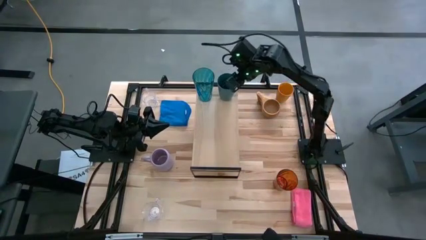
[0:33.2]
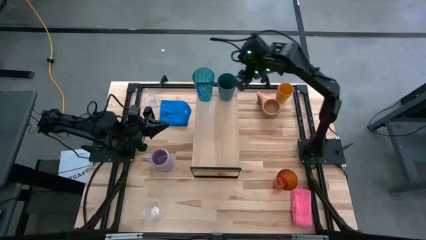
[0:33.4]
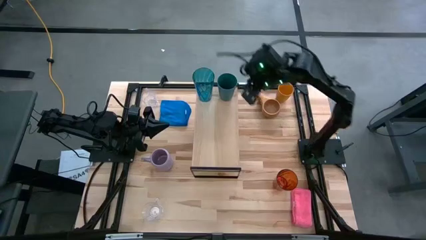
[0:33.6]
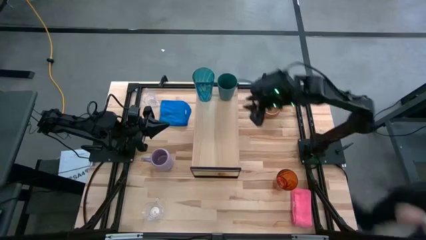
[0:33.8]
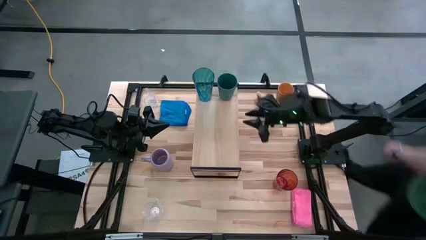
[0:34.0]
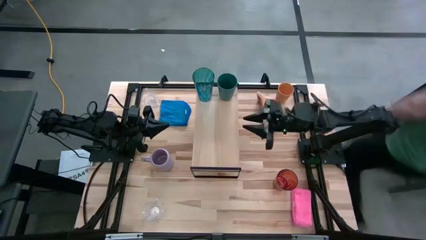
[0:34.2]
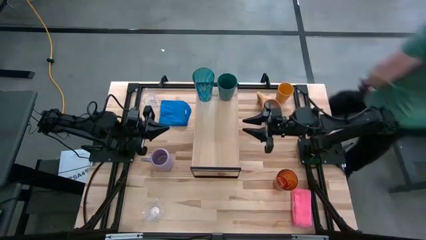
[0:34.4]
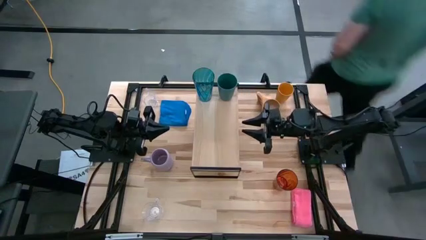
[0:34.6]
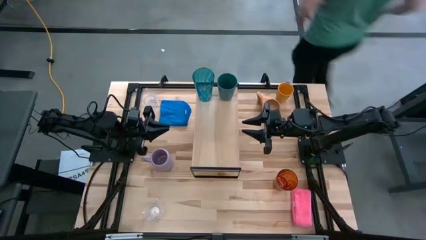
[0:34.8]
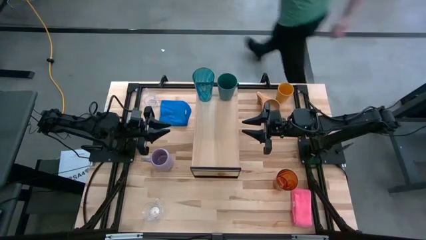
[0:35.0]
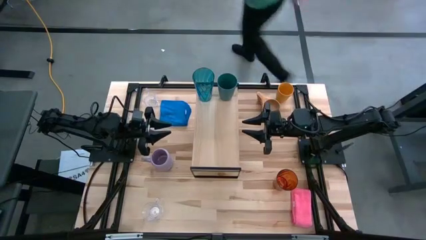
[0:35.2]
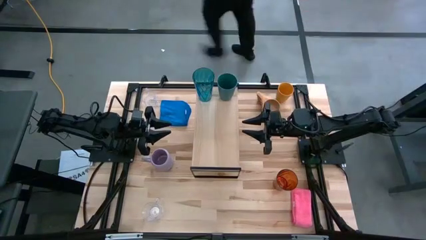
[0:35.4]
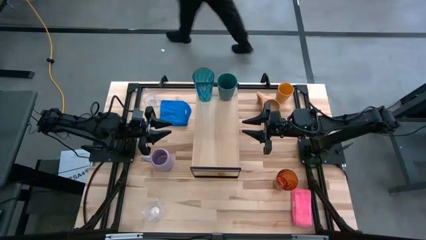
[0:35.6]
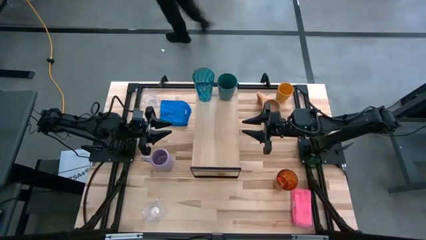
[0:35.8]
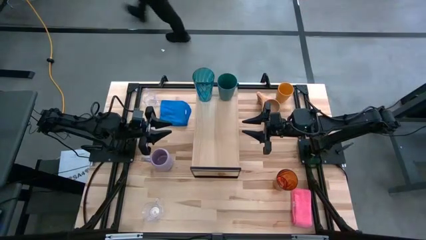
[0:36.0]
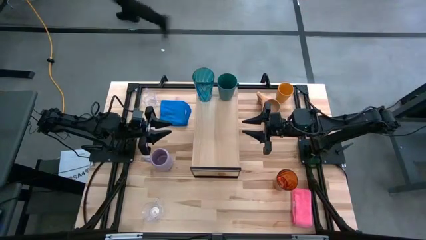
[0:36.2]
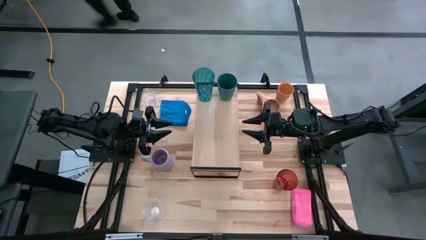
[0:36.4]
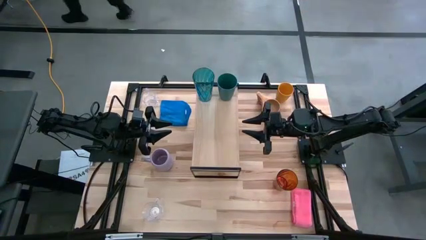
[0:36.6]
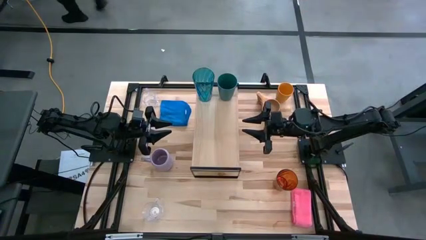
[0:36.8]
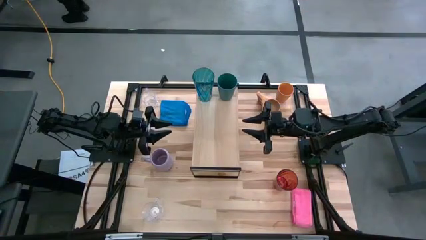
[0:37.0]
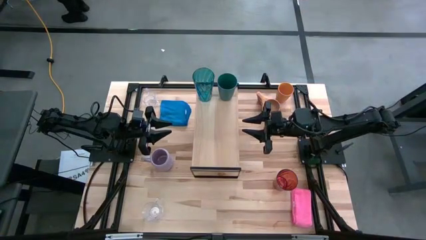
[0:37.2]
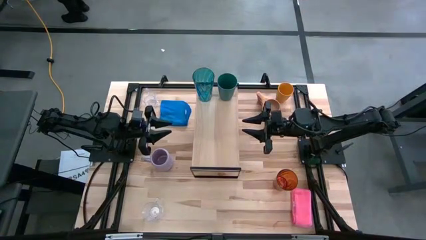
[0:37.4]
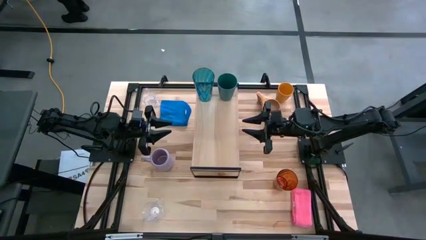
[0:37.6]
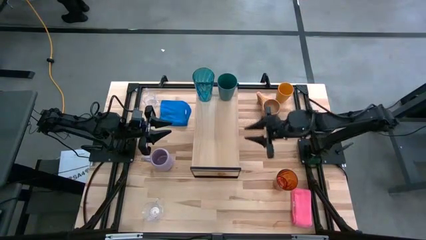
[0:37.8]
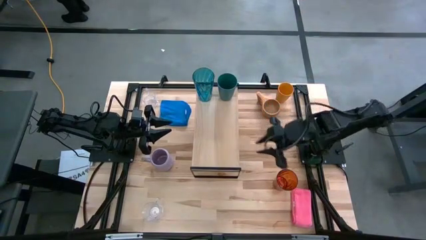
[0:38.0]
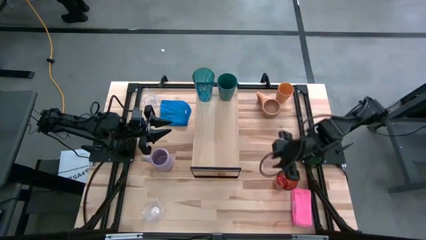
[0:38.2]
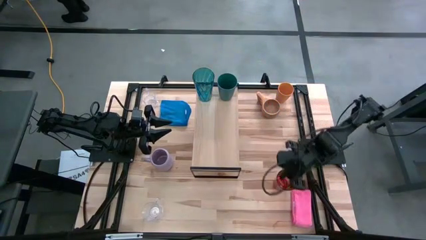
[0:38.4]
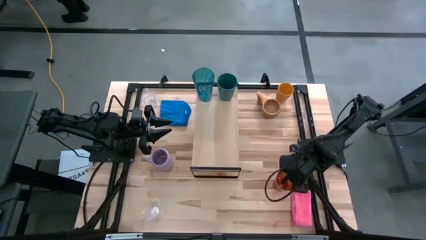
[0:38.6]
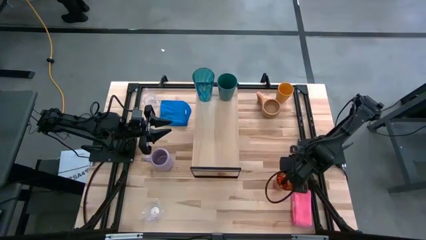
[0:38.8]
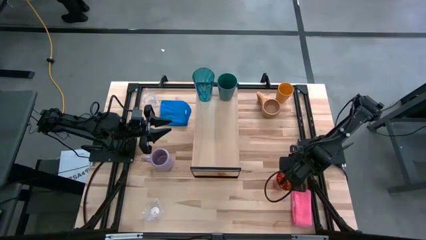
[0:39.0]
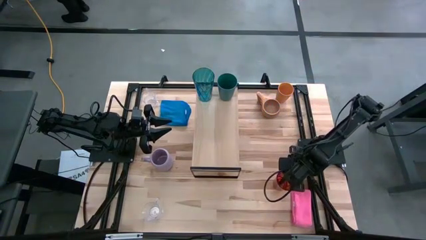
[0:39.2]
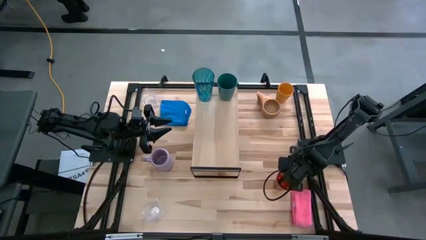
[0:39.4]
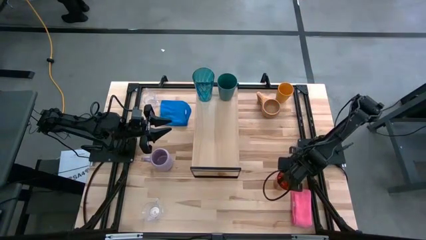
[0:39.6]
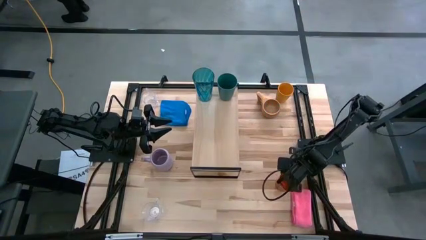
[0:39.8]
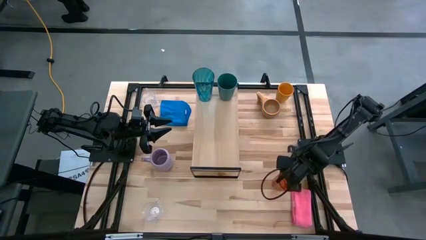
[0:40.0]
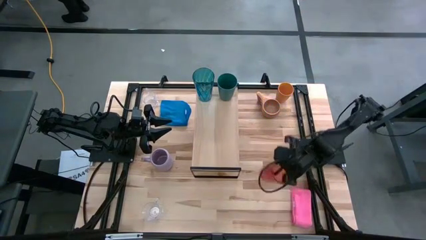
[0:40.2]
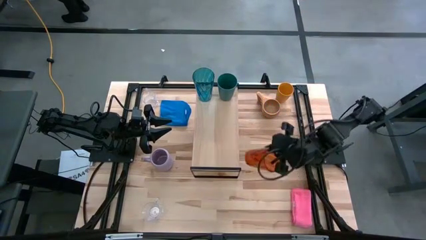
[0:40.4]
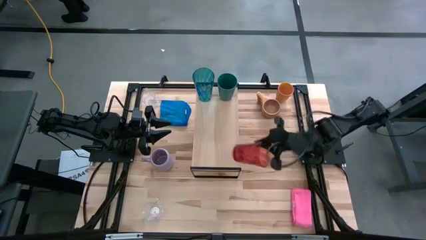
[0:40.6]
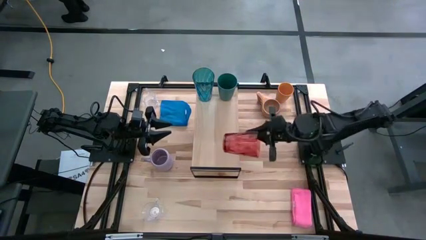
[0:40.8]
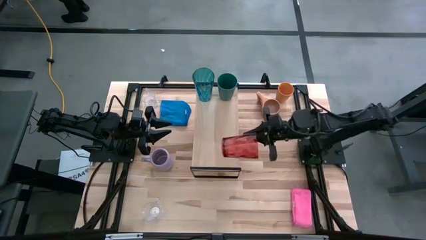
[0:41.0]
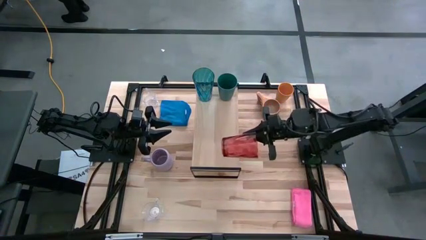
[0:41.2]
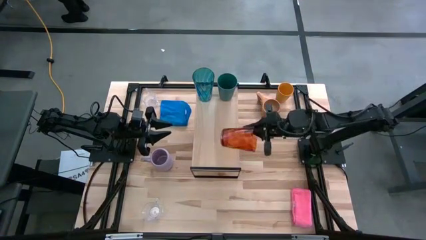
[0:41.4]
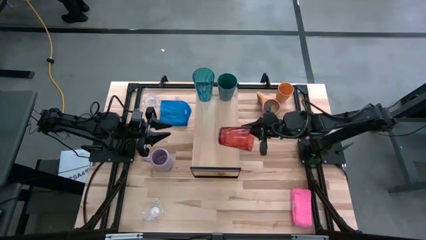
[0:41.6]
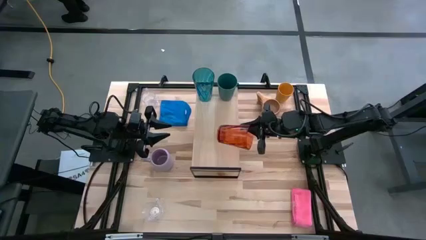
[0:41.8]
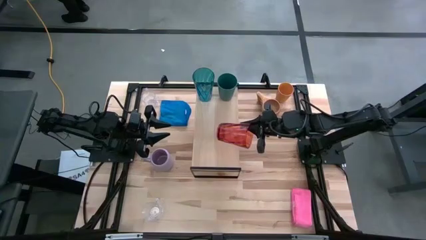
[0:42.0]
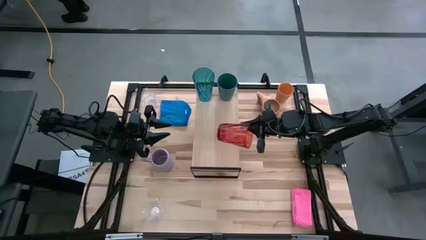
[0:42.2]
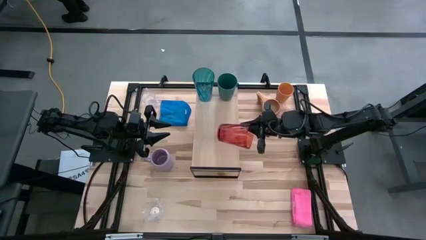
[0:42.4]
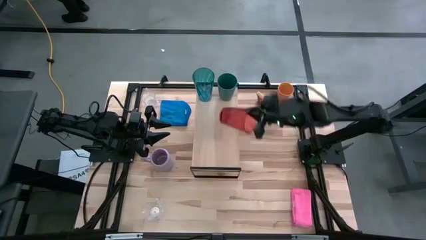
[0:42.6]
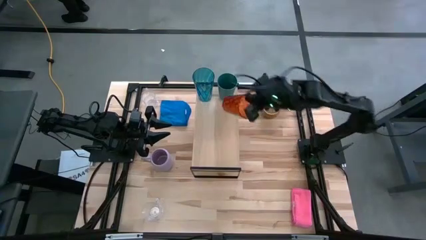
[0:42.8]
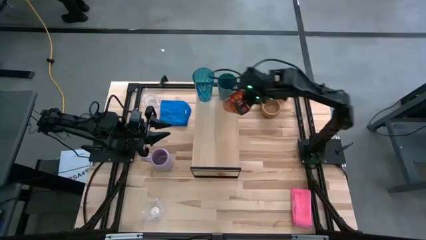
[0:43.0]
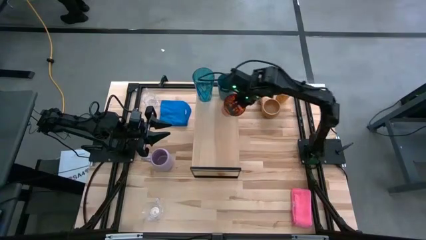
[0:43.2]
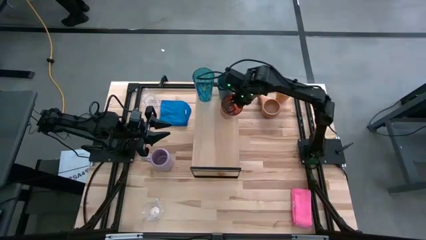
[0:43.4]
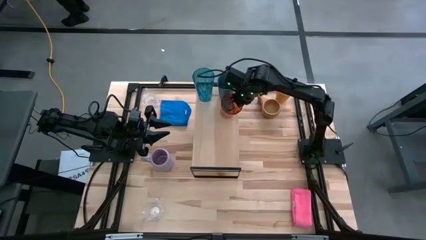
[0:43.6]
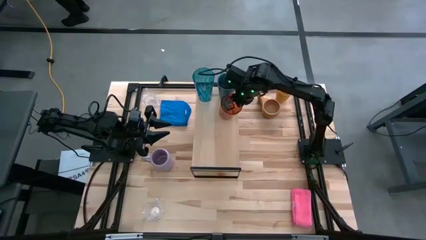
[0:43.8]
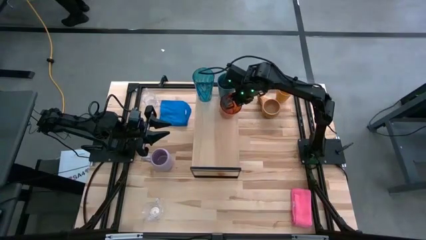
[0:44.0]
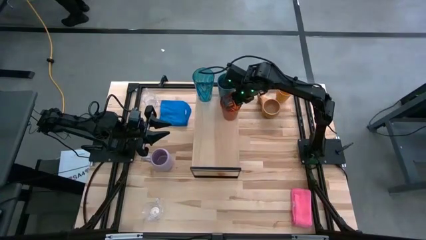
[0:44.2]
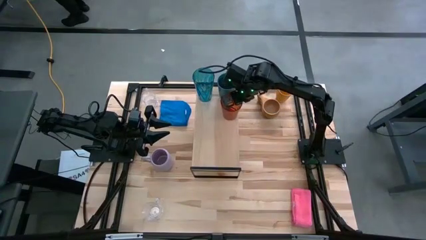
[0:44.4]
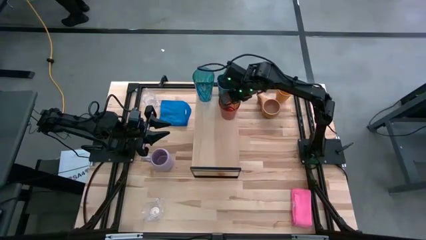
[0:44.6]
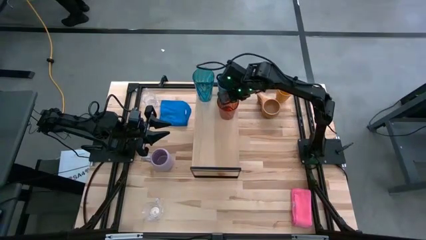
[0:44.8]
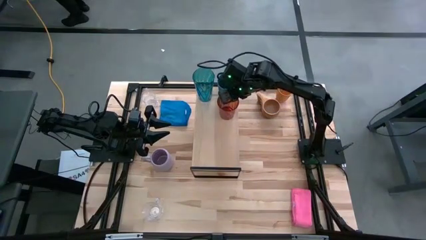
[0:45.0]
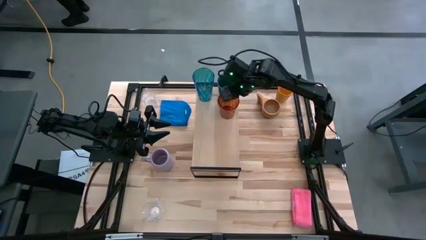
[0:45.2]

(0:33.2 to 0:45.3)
Task: Stack small to large cups/mugs on shelf
Put the orange cup on the shelf

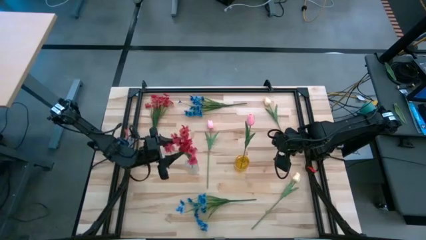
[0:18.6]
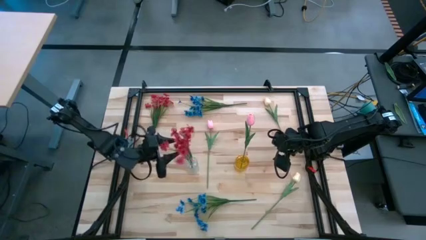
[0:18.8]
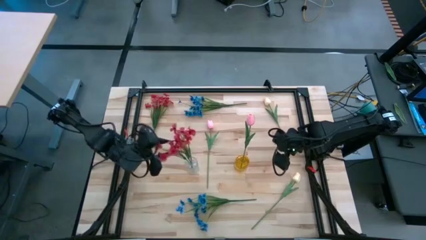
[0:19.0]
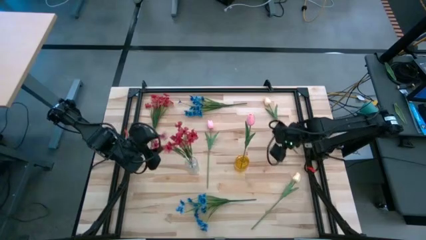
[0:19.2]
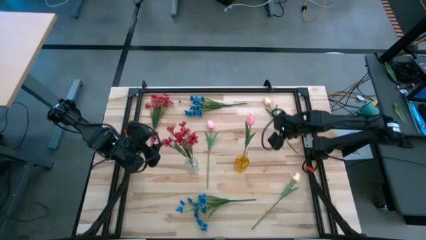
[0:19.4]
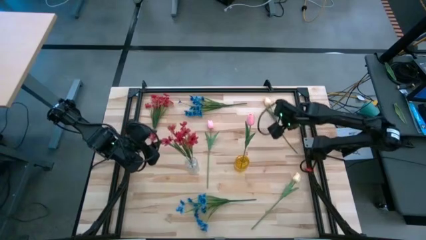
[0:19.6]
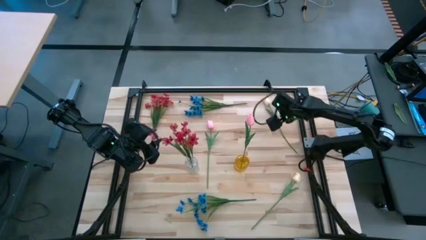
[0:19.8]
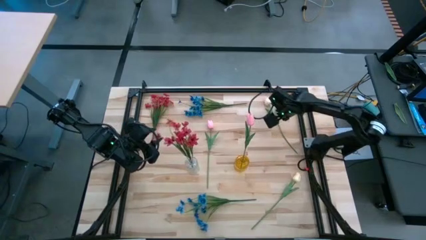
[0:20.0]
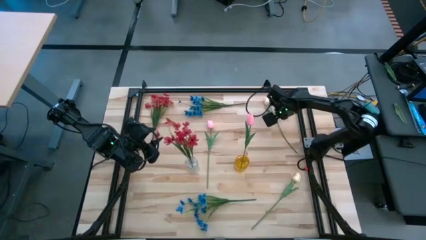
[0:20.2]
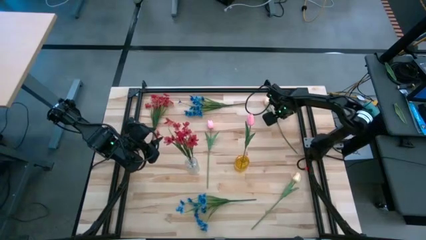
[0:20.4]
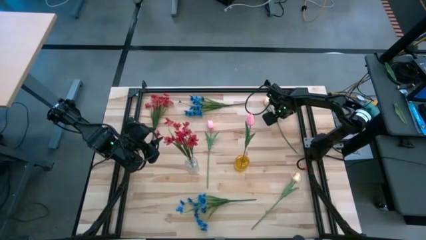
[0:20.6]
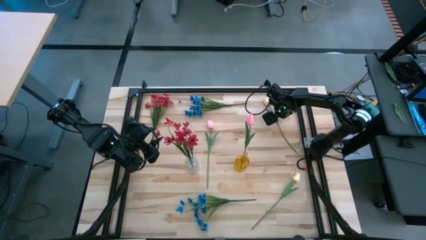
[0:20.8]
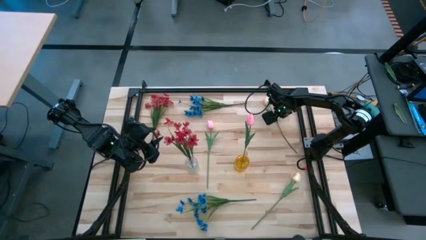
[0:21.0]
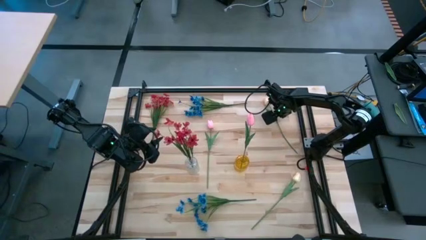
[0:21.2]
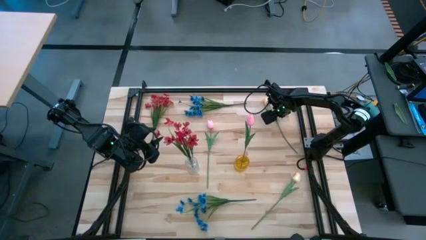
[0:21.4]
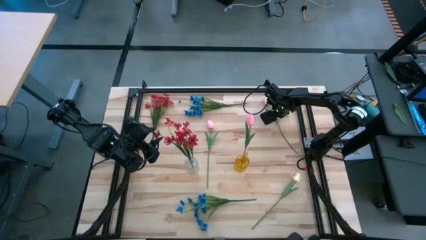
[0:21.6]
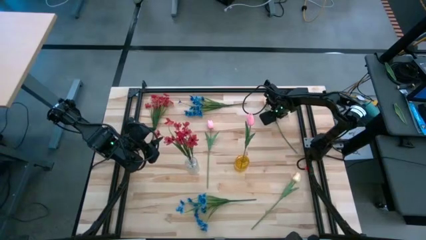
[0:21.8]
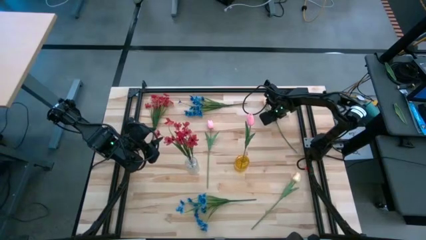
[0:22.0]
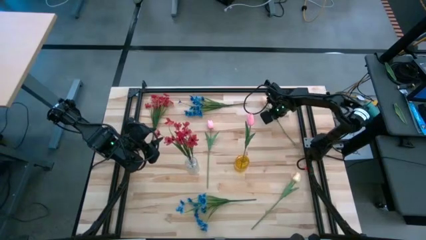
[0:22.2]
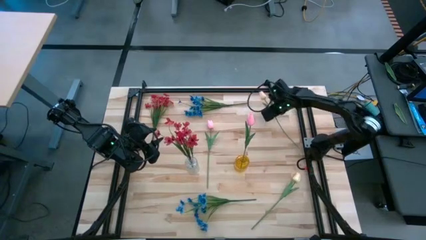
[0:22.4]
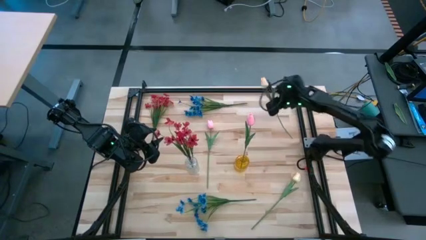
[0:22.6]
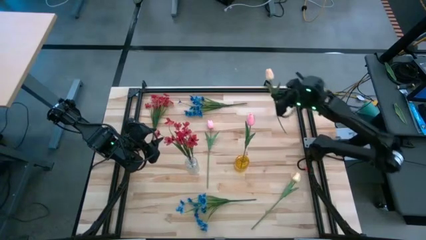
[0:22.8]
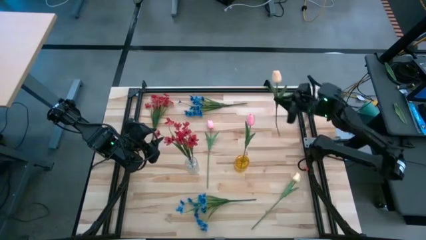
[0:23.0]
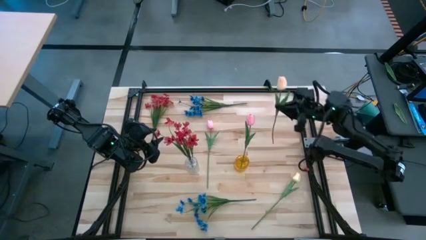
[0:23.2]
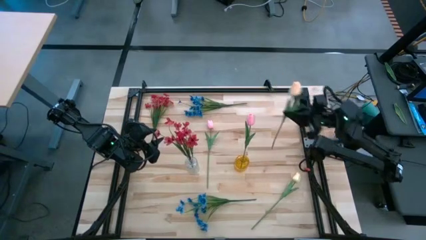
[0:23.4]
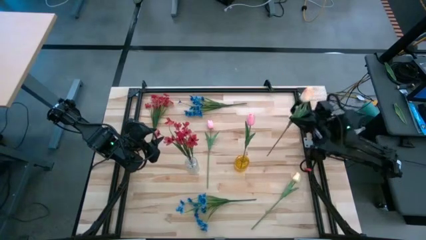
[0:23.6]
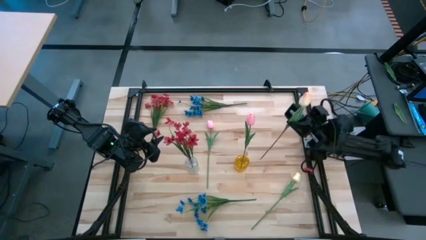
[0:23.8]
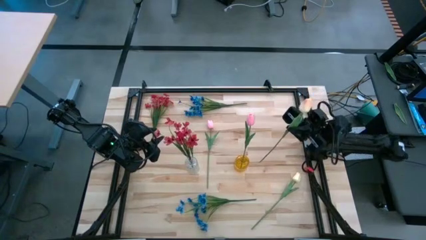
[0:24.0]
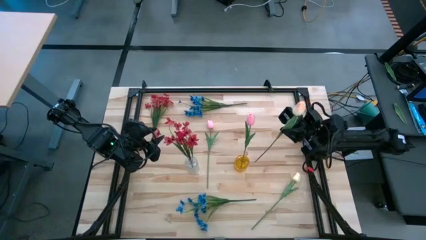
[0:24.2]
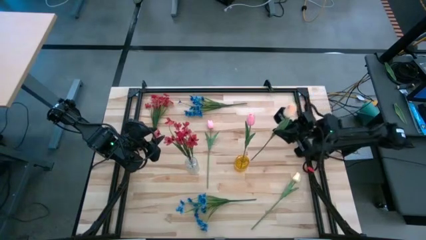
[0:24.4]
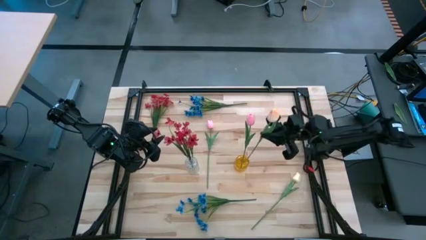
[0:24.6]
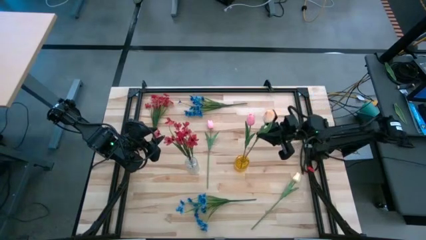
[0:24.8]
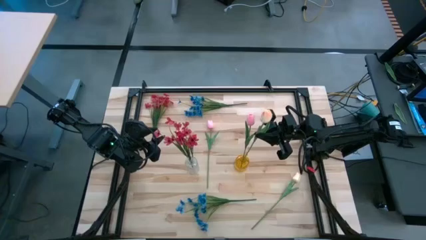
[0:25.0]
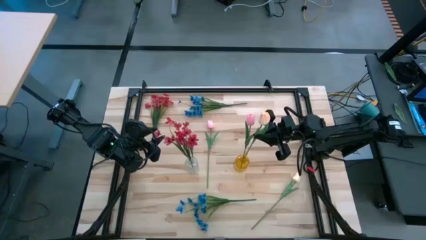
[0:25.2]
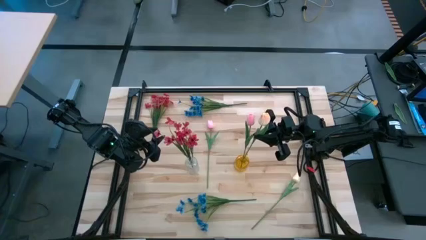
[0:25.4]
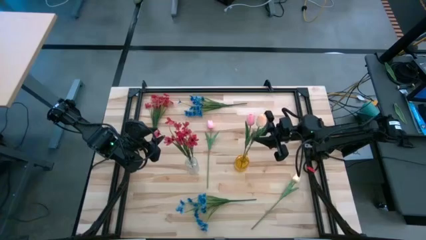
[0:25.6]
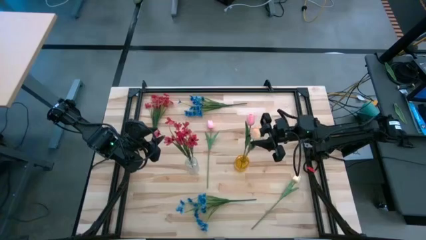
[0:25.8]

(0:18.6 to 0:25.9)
Task: Sort flowers into vase by color
Put the top pink and white flower into the yellow vase
